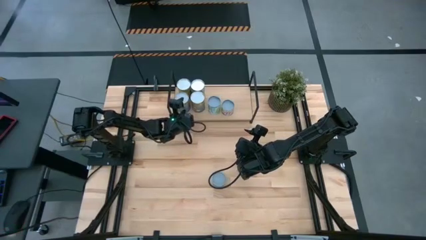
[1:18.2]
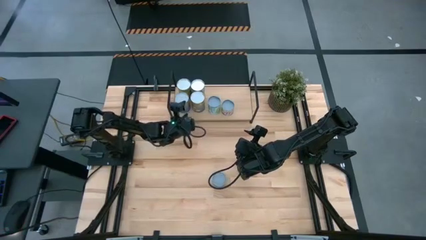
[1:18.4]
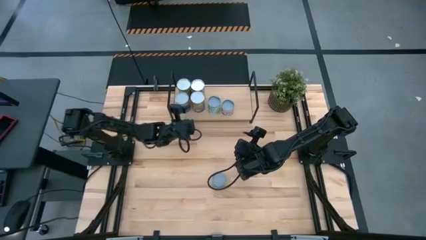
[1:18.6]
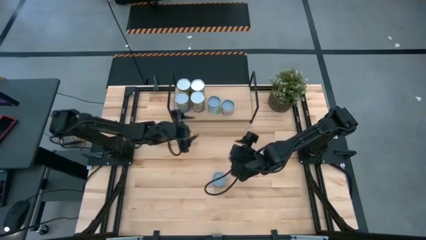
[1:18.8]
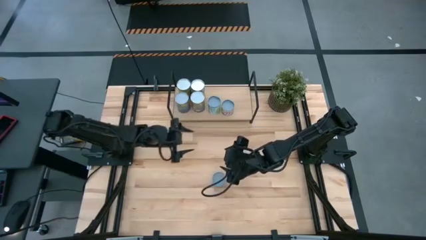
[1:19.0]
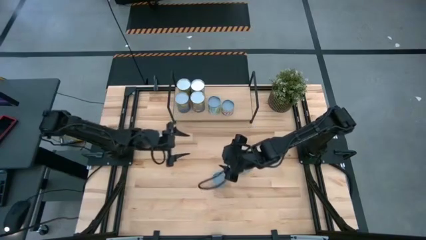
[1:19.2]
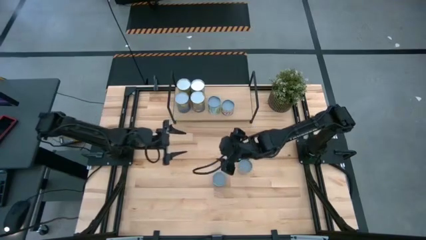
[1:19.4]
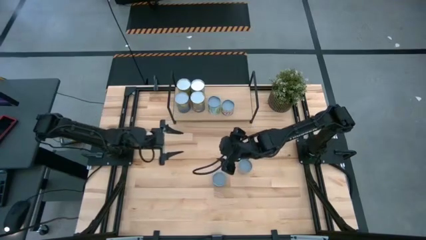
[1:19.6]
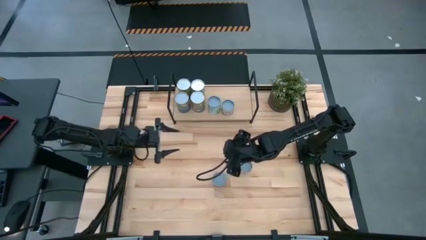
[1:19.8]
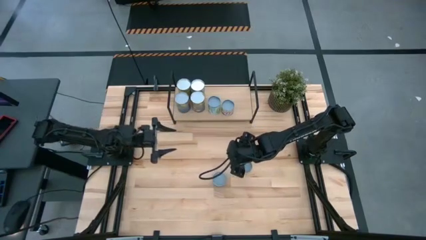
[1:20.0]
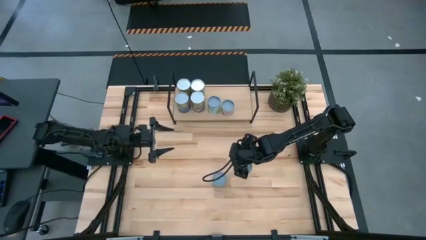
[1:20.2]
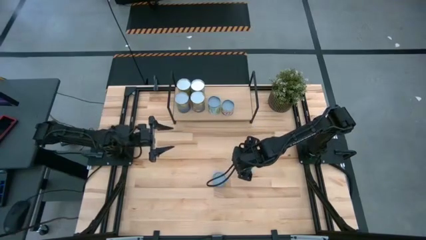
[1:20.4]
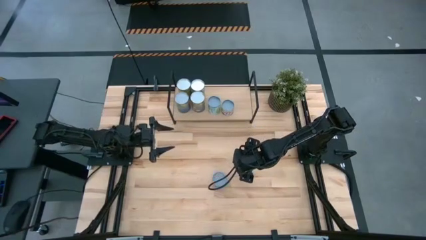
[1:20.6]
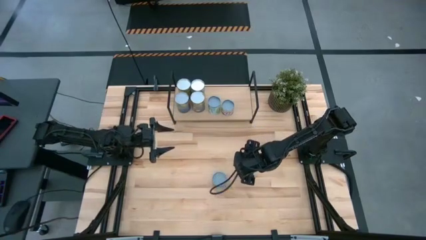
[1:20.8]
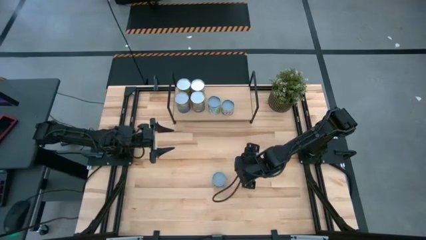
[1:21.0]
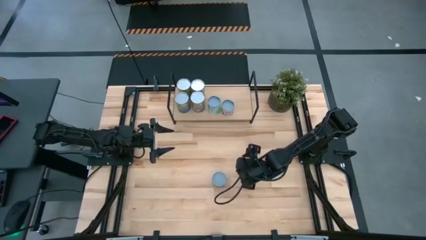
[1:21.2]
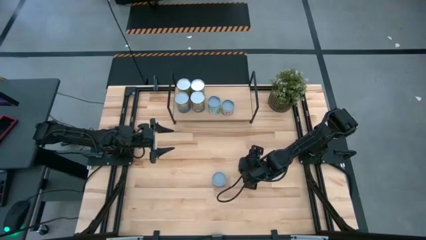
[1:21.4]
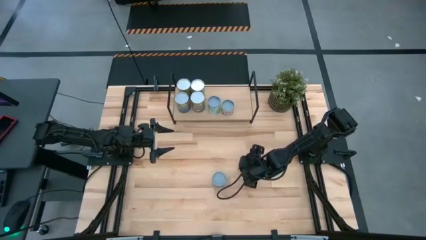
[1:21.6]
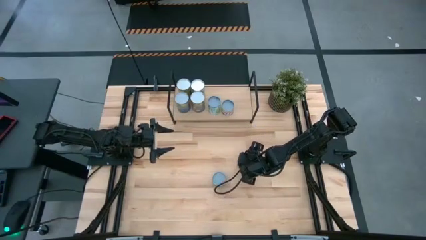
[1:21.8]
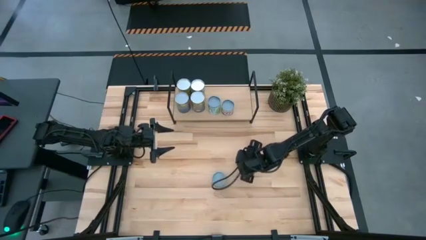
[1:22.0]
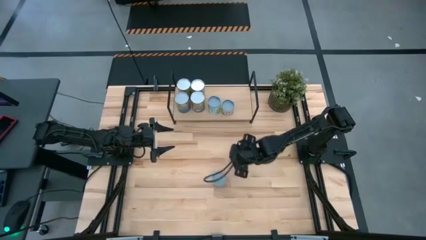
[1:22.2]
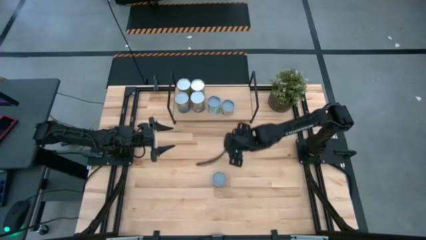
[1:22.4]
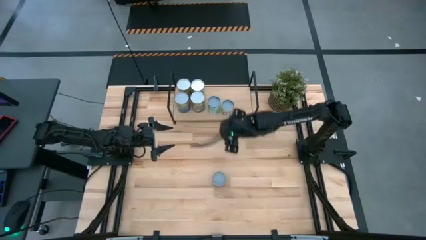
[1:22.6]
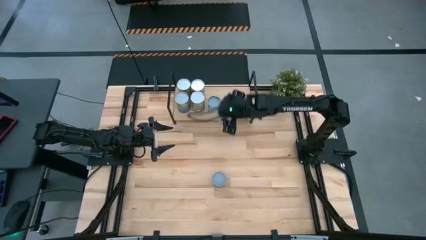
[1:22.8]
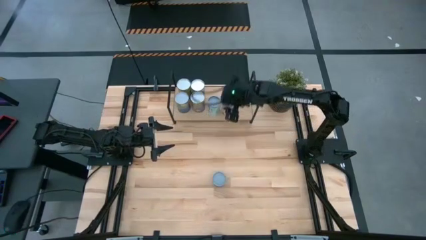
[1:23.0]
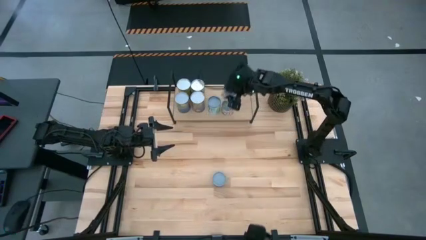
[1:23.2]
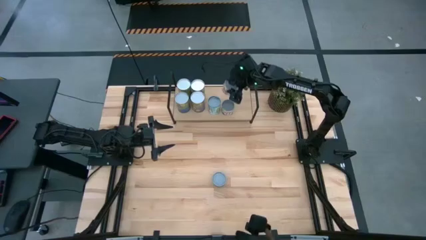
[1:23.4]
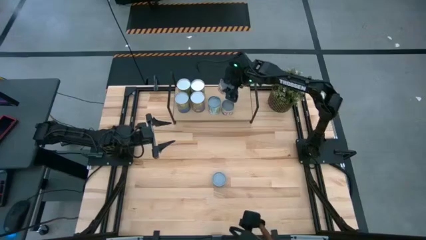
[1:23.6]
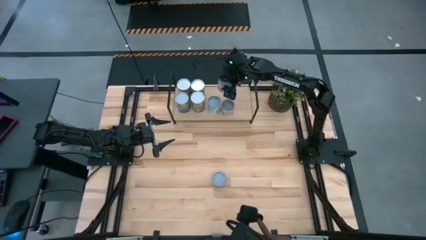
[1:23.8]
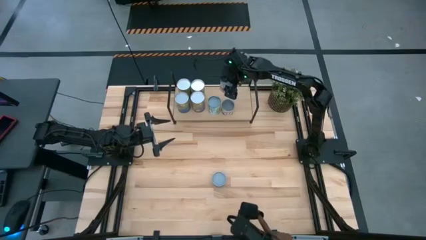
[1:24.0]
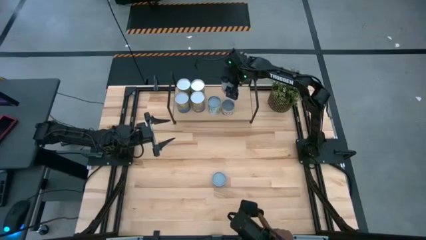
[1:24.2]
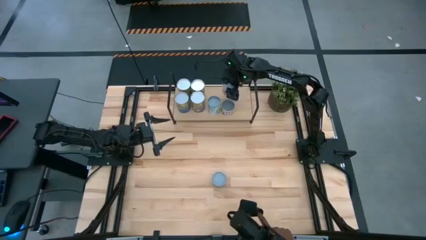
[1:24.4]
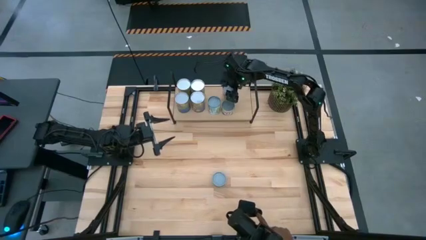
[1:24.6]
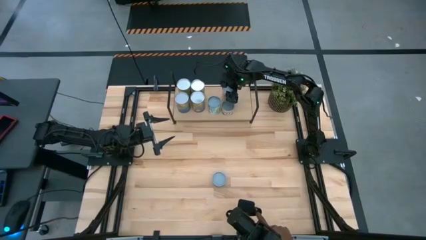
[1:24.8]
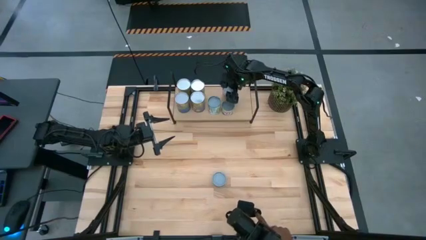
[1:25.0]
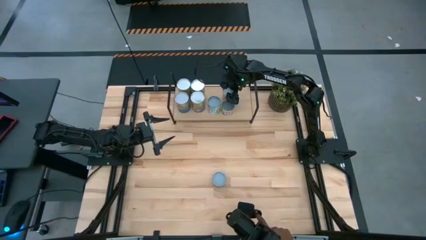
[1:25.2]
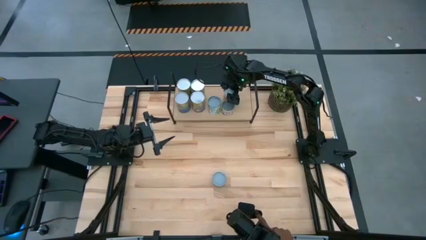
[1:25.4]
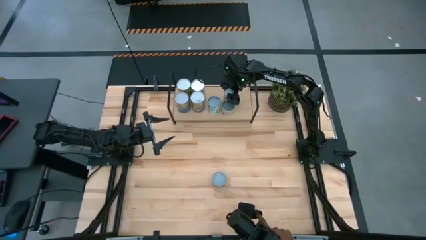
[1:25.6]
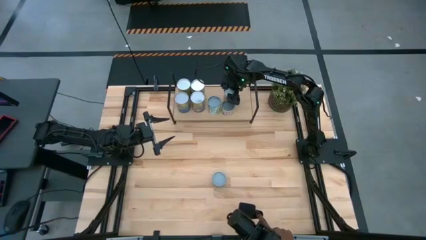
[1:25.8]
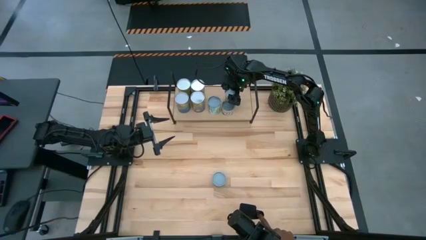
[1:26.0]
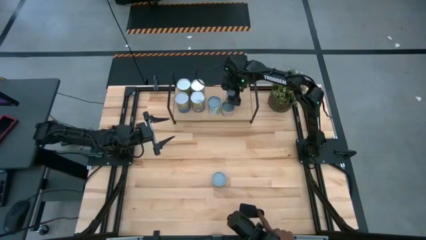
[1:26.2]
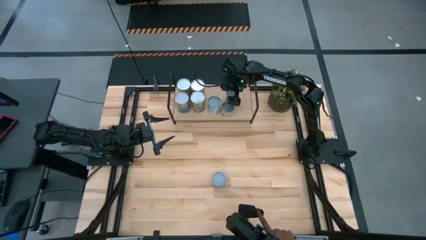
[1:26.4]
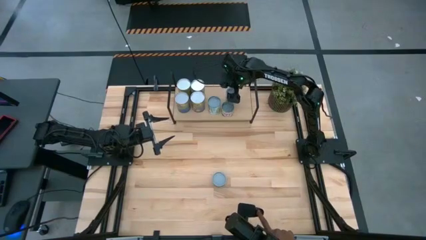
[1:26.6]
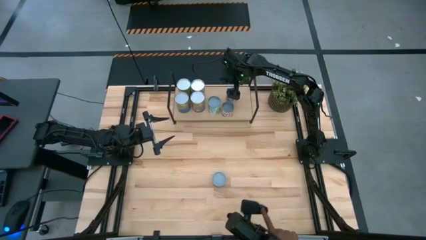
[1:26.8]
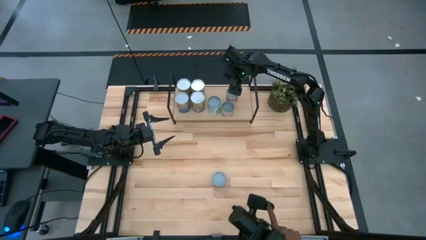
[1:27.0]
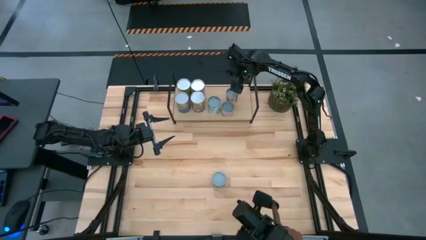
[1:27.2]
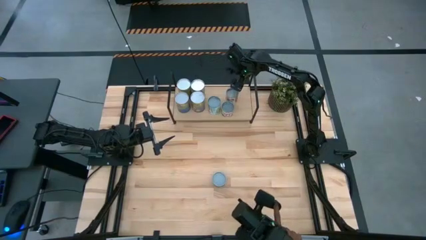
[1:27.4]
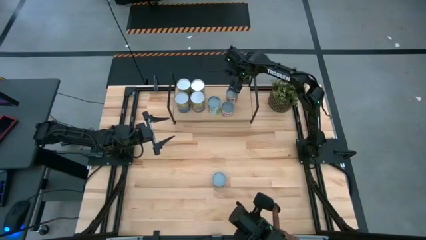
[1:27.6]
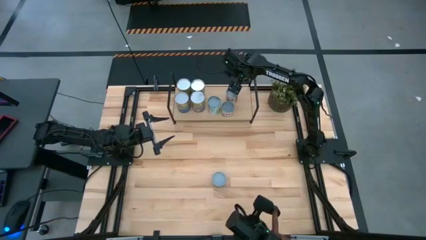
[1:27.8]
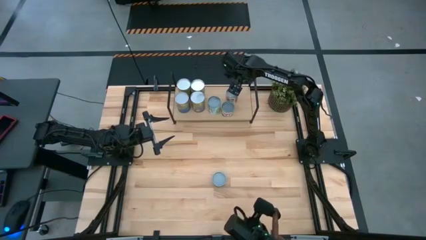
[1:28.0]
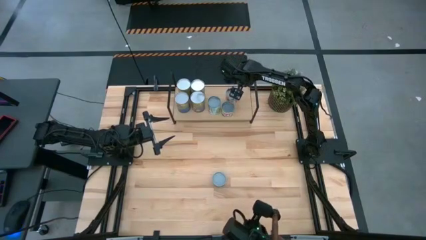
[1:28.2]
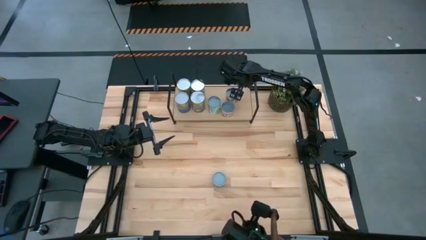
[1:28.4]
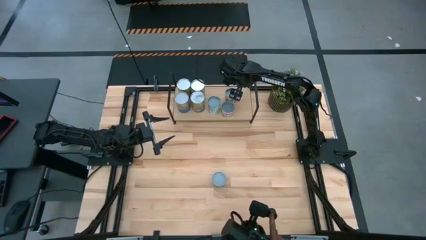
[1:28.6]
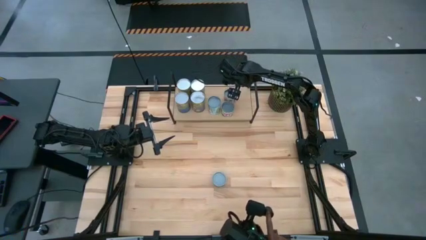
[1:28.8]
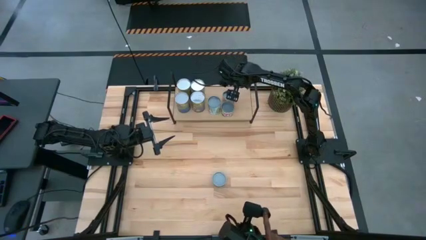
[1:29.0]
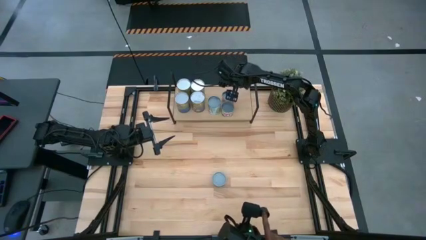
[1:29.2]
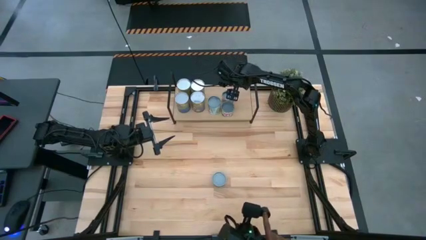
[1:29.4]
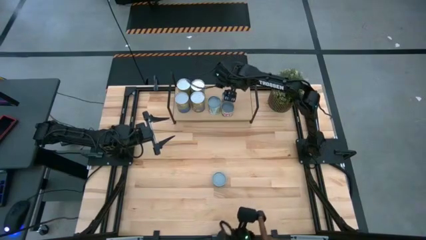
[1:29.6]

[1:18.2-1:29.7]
Task: Pick and place cans onto a shelf
Put the canned tomatoes on the shelf

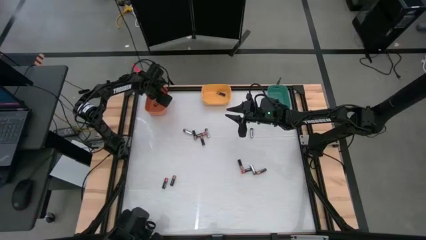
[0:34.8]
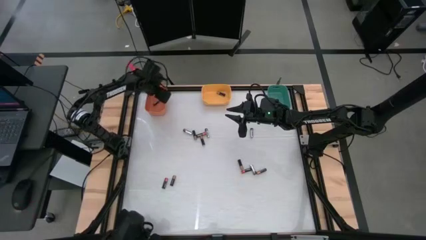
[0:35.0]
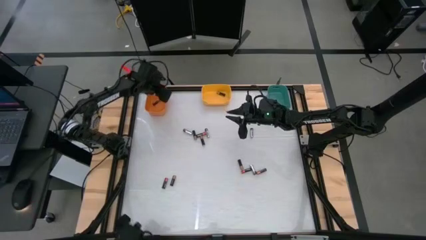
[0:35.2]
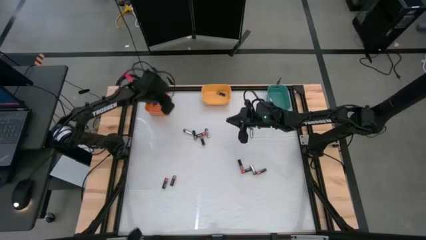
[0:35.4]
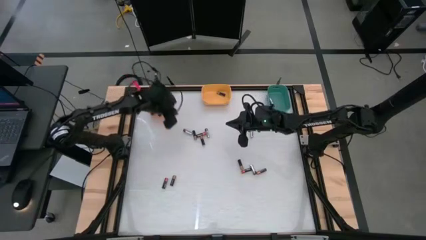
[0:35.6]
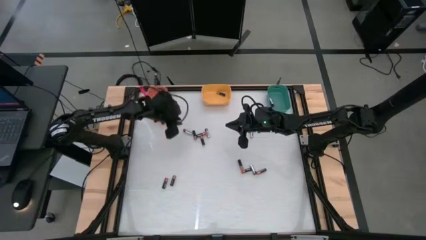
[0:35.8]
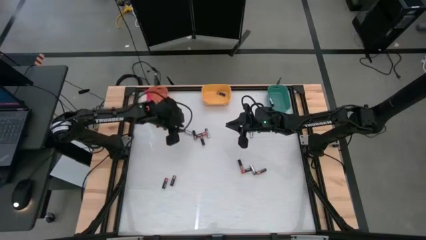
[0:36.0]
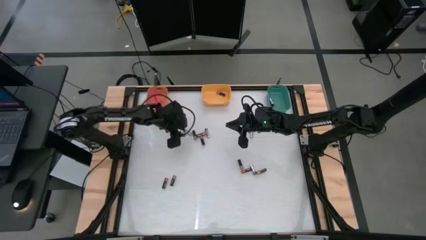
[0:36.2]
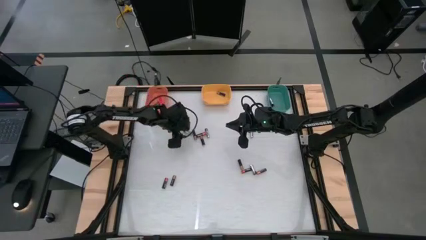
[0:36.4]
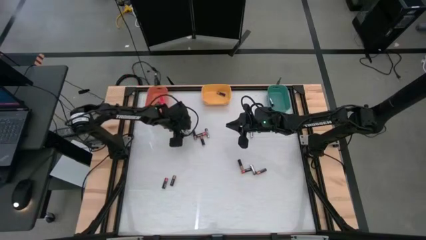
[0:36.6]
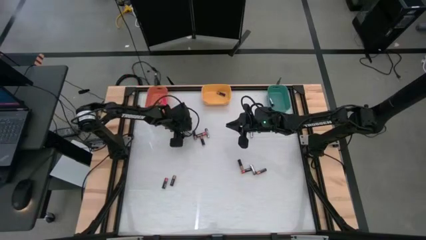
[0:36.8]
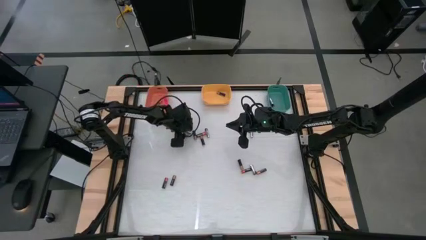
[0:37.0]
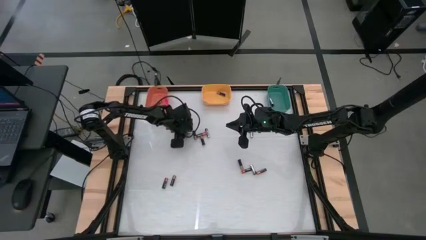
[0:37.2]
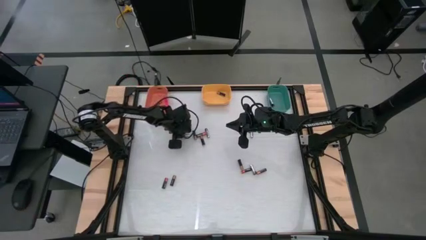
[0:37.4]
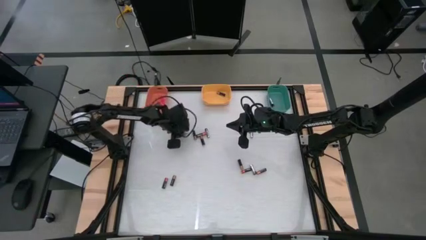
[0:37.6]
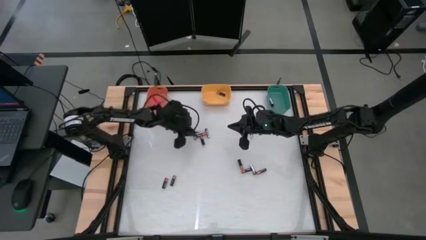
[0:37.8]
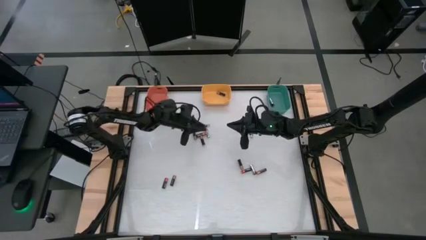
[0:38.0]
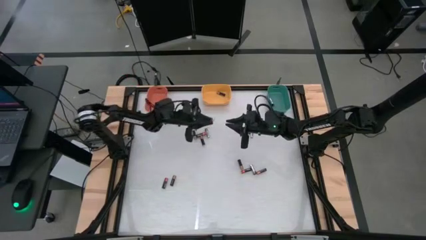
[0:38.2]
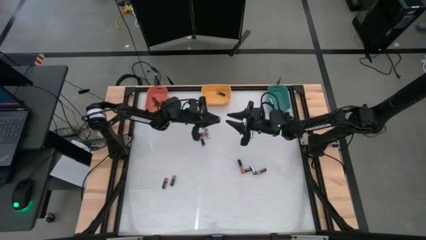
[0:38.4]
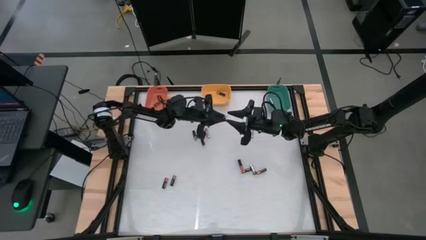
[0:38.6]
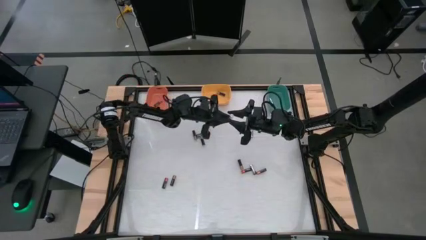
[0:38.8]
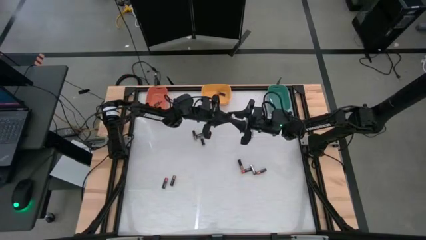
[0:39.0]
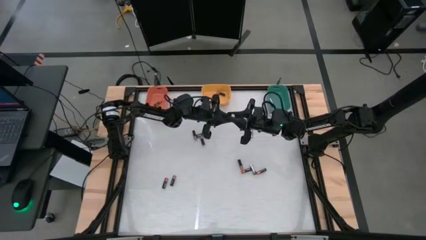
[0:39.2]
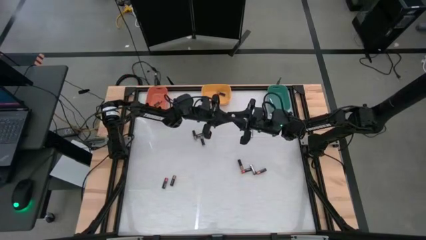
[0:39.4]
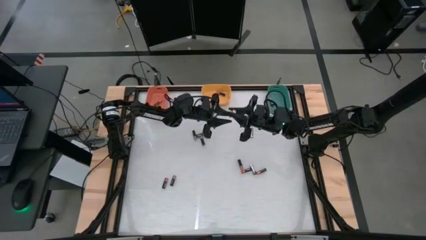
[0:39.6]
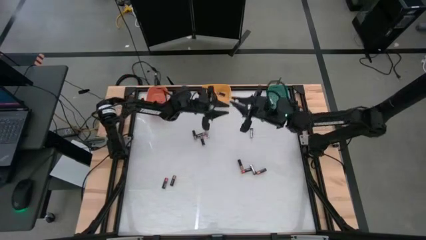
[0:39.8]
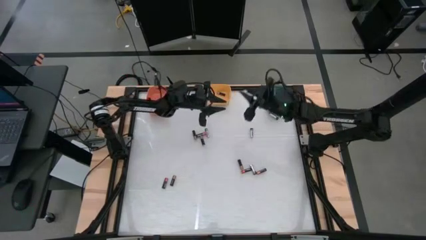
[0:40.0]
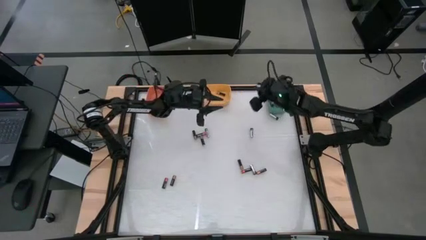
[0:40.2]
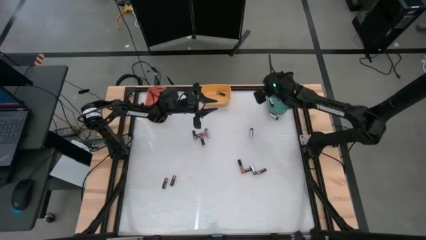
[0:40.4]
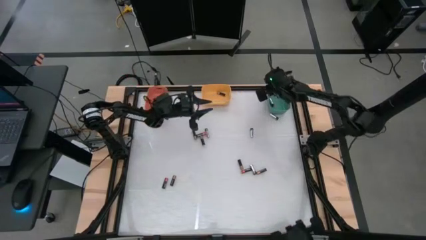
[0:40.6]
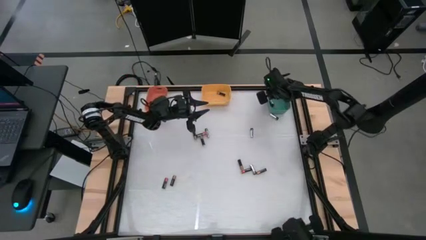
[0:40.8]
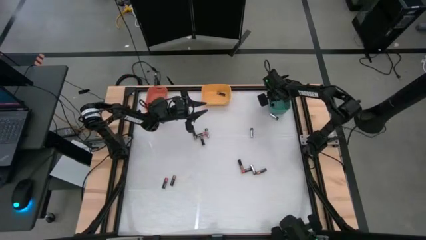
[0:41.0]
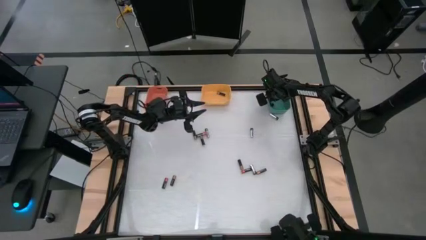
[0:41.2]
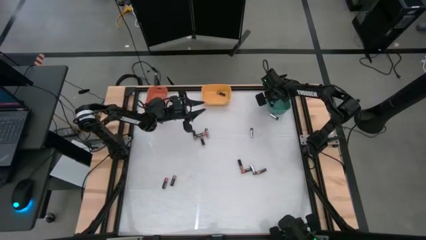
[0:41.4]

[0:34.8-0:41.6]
Task: Sort batteries
Put the black battery into the green bin
